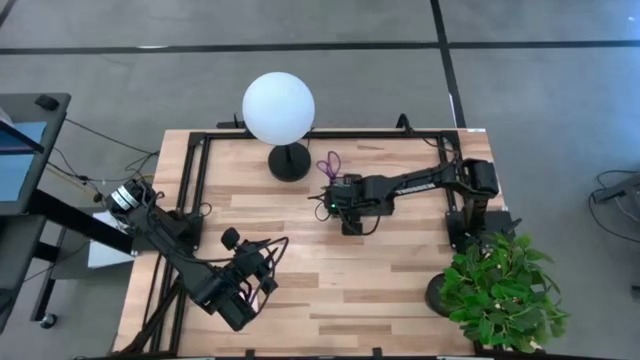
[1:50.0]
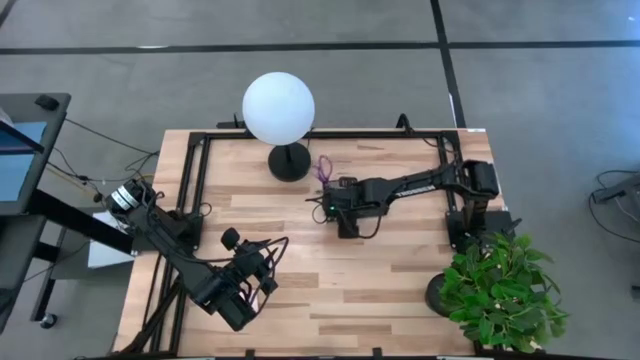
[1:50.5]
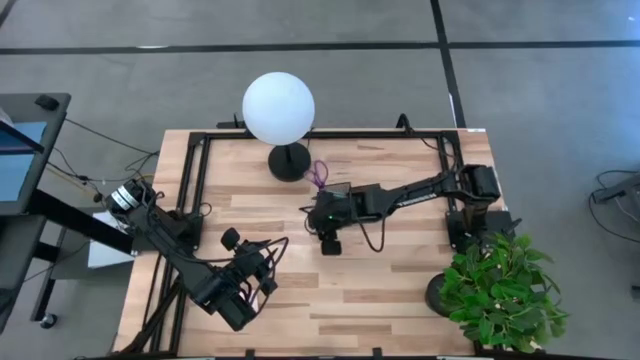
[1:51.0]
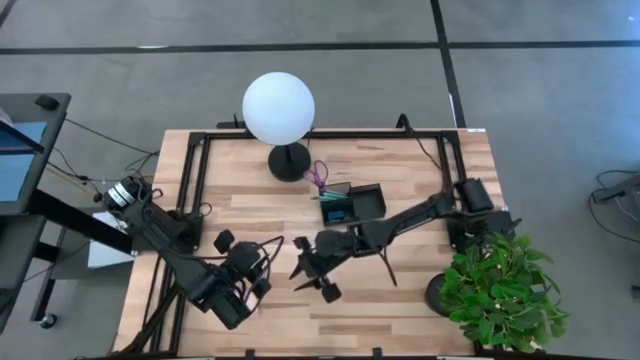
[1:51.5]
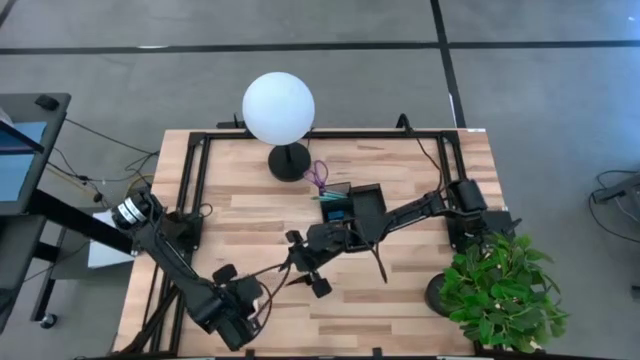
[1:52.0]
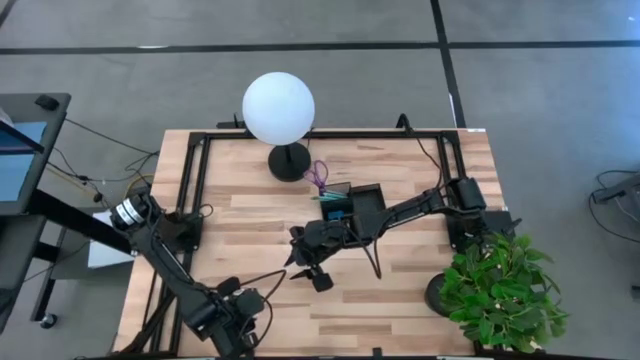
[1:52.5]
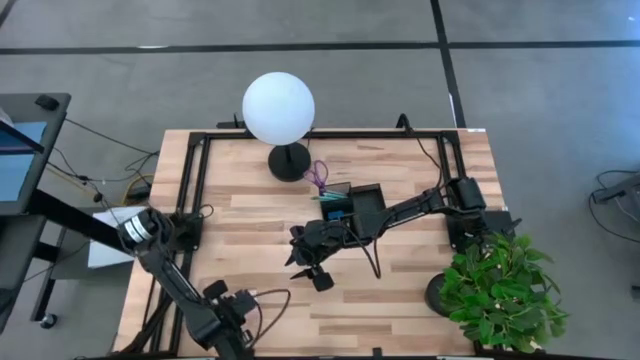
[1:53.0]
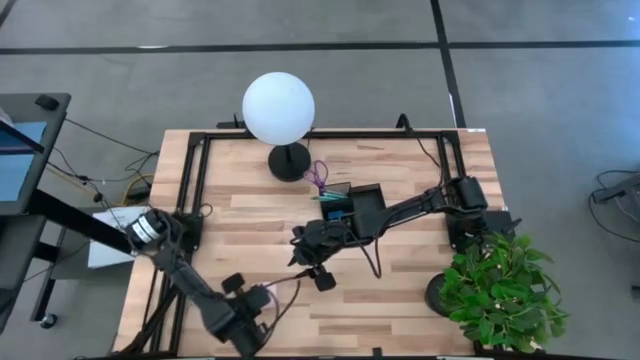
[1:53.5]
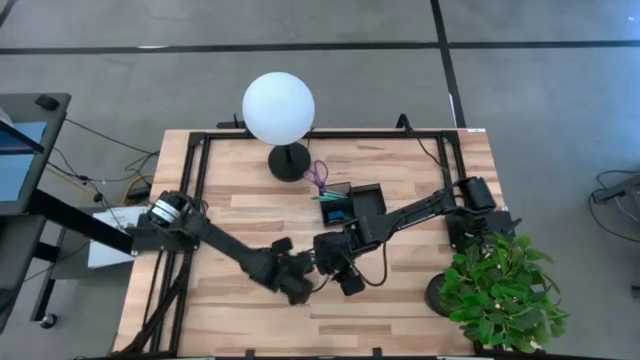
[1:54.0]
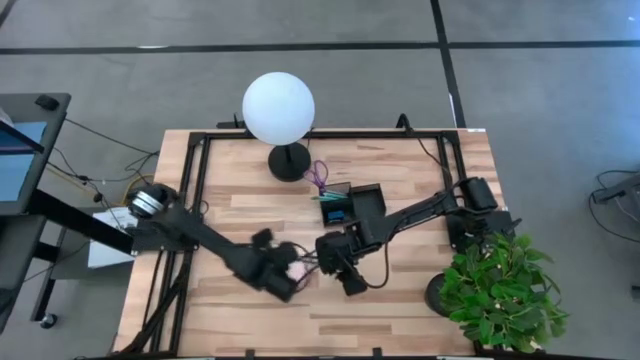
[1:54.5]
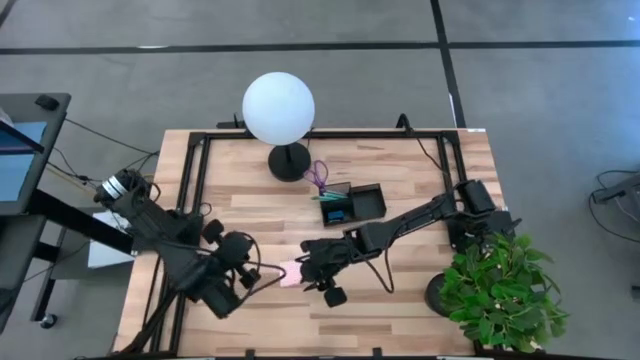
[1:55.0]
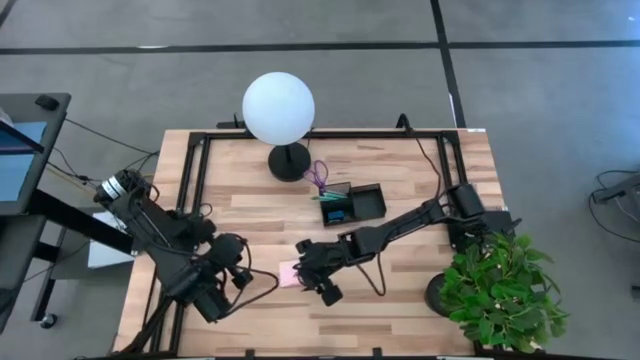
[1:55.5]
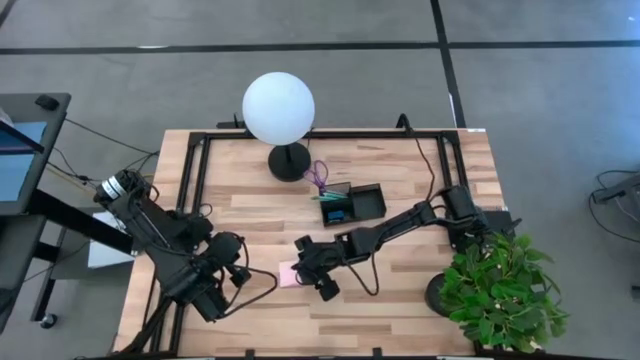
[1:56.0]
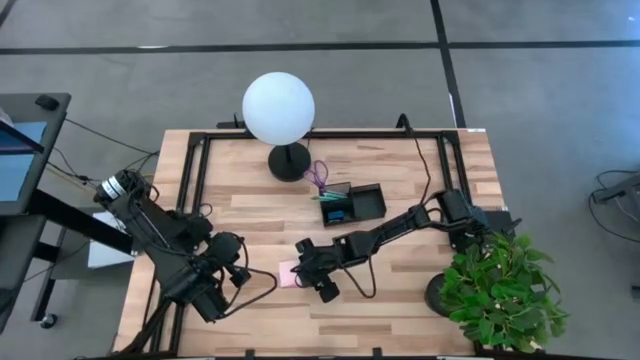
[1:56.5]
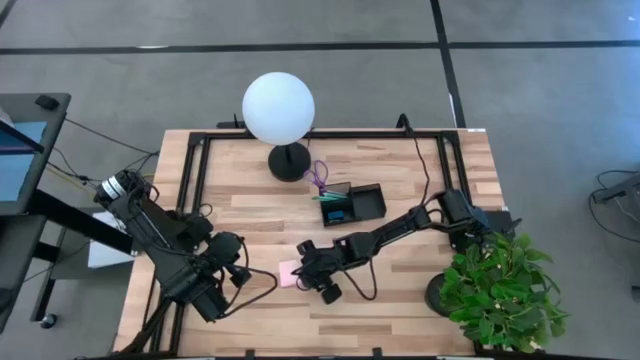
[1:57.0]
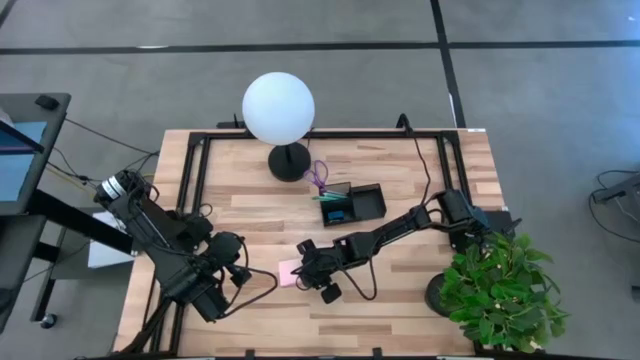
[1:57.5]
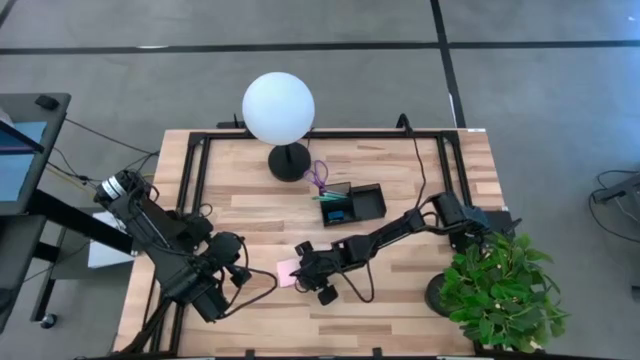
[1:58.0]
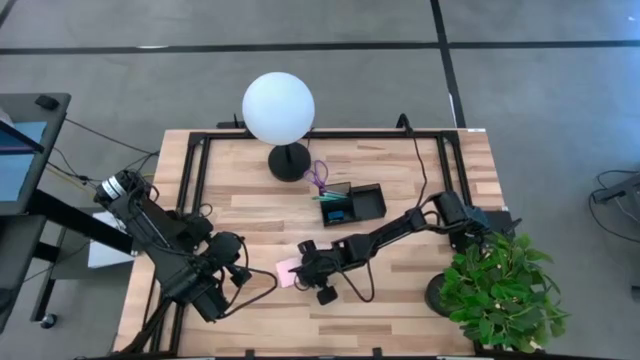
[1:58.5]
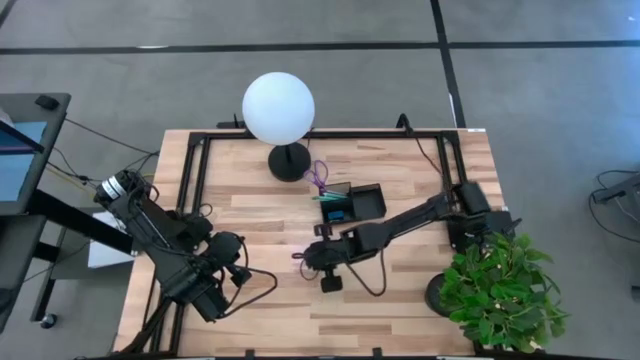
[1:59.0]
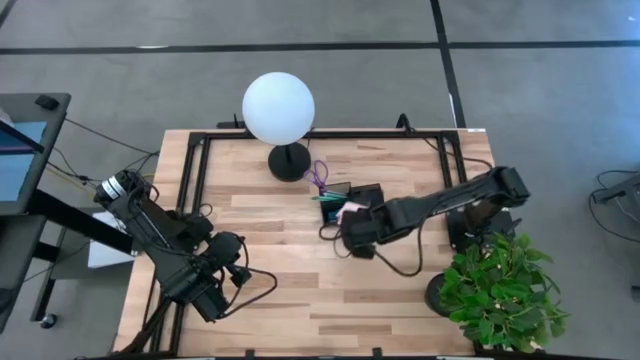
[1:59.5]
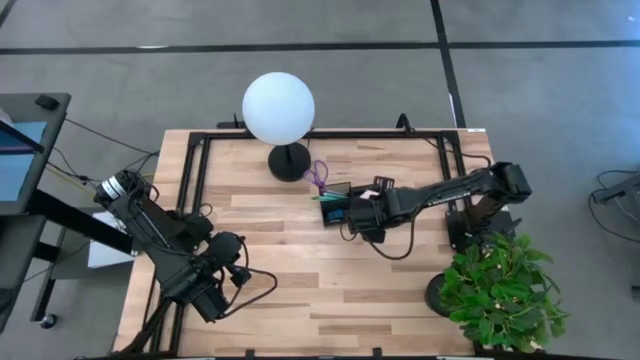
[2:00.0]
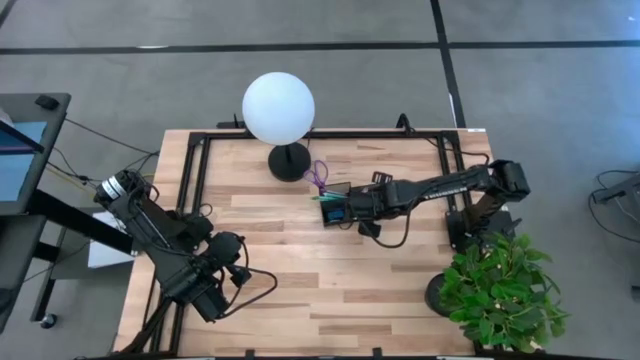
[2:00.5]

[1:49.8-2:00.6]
Task: Pick and place office supplies into organizer
Put the pink sticky notes into the black desk organizer

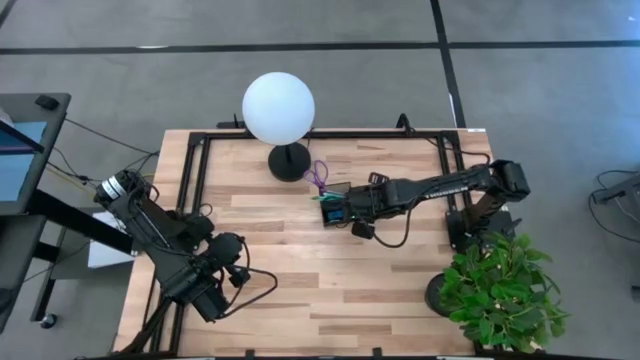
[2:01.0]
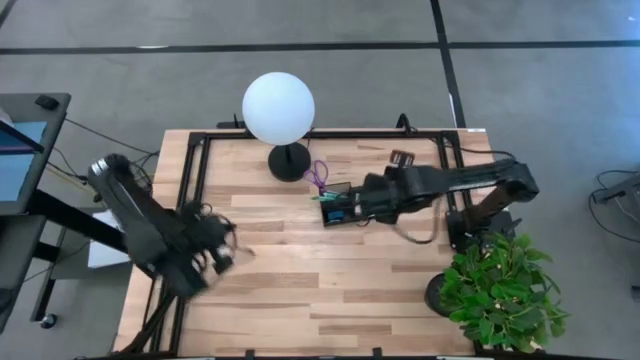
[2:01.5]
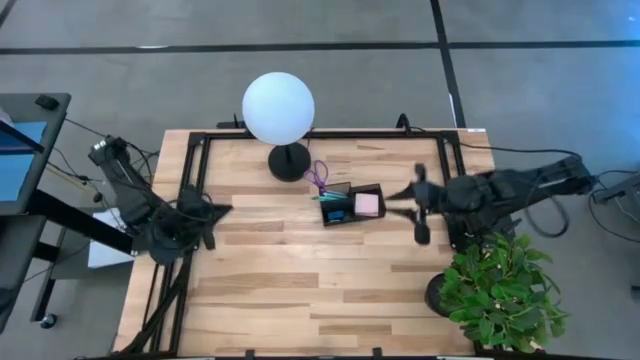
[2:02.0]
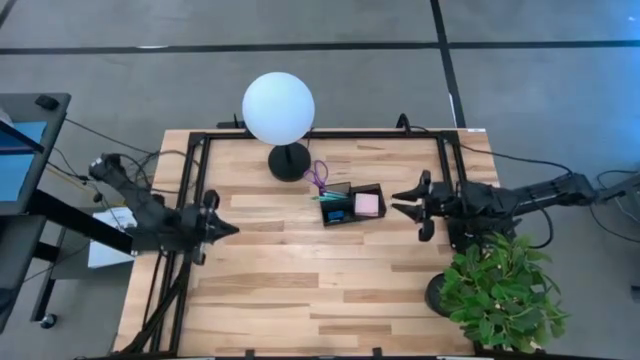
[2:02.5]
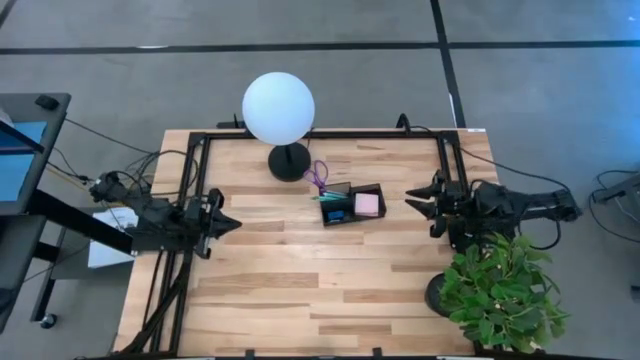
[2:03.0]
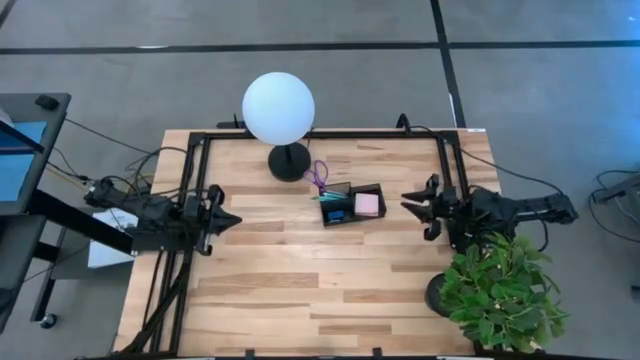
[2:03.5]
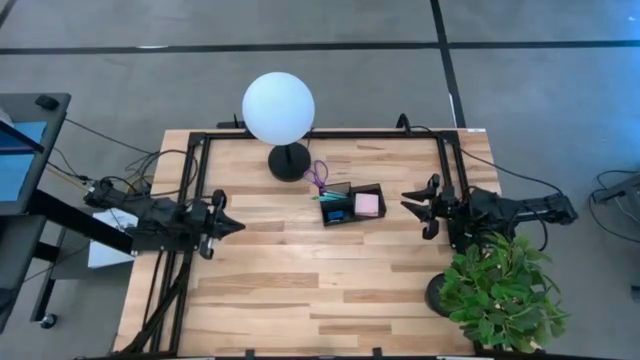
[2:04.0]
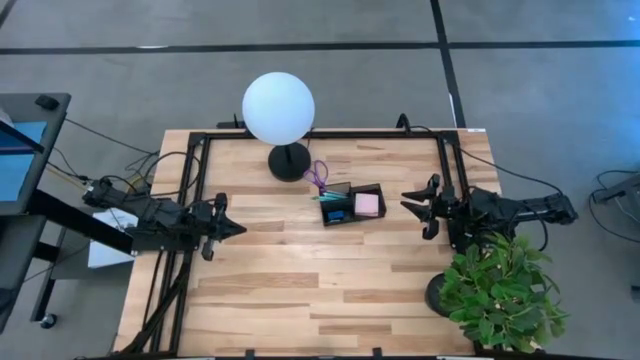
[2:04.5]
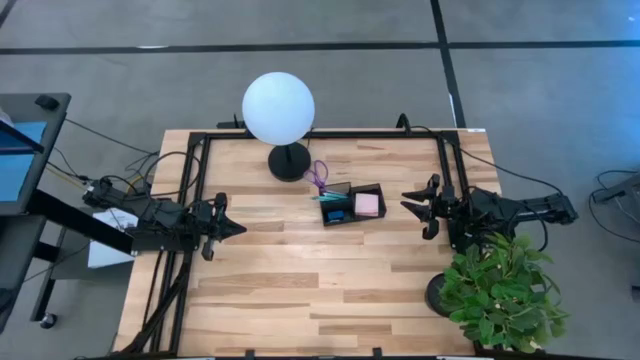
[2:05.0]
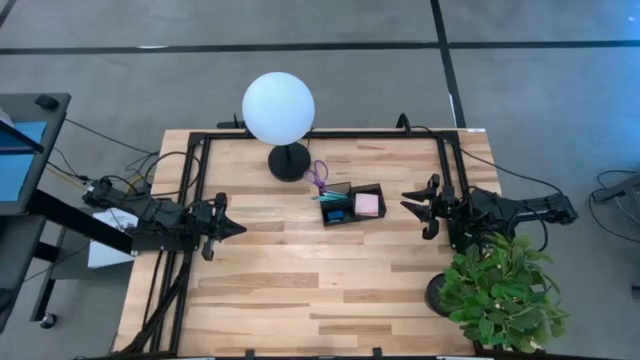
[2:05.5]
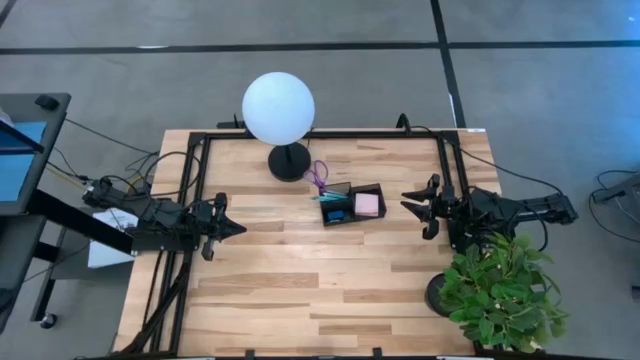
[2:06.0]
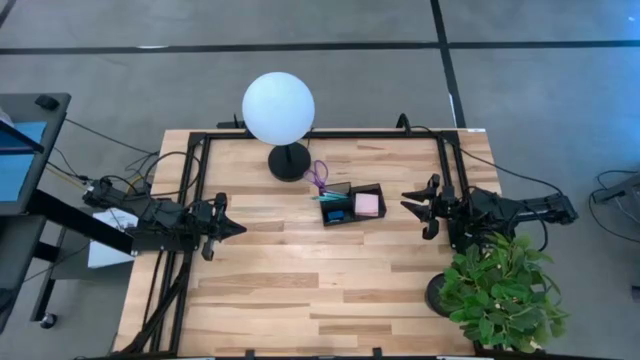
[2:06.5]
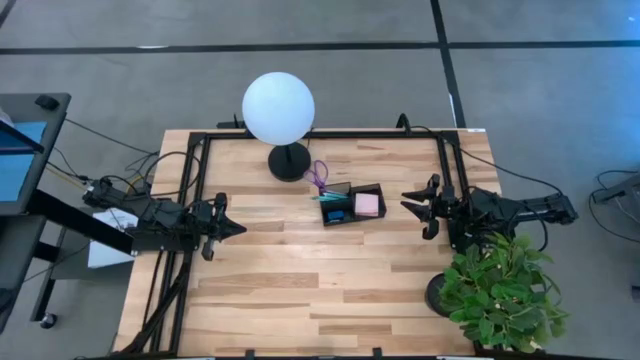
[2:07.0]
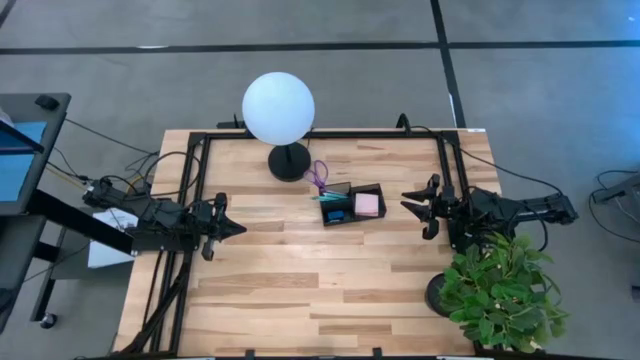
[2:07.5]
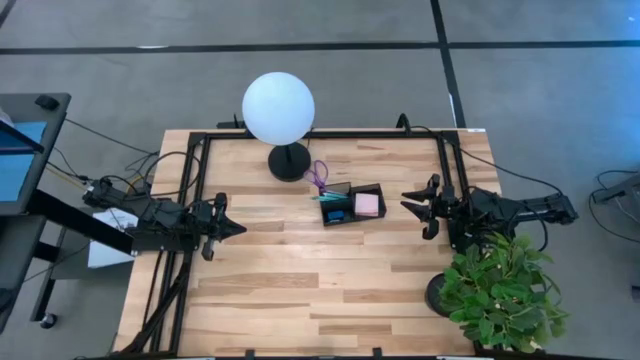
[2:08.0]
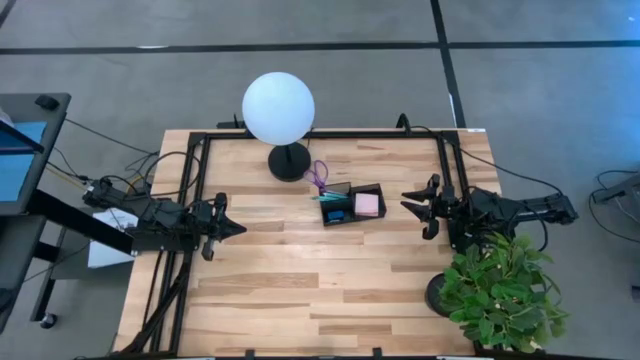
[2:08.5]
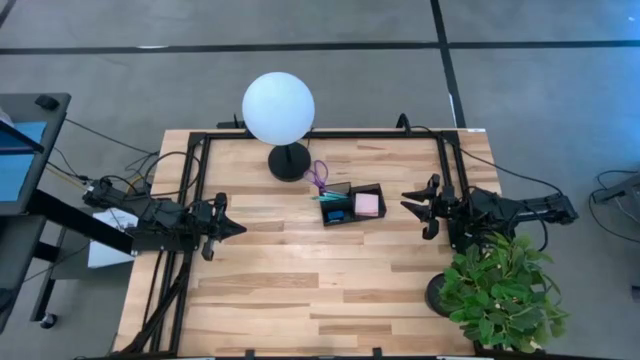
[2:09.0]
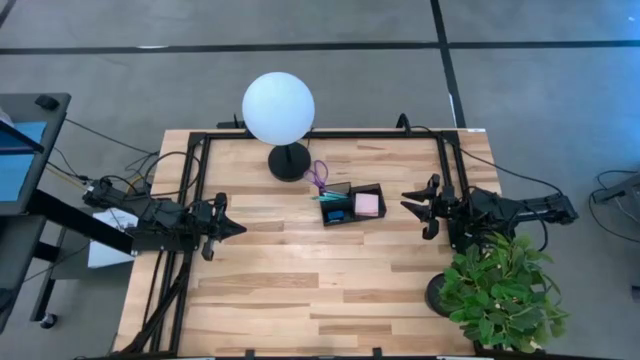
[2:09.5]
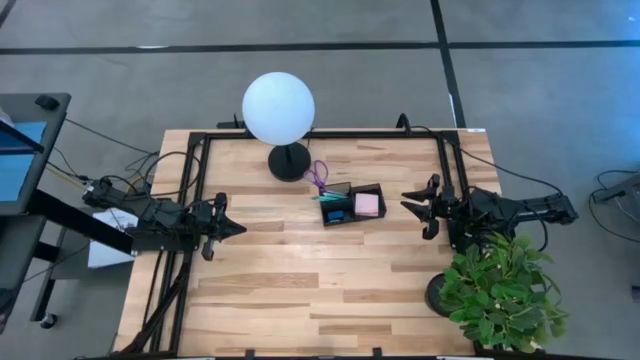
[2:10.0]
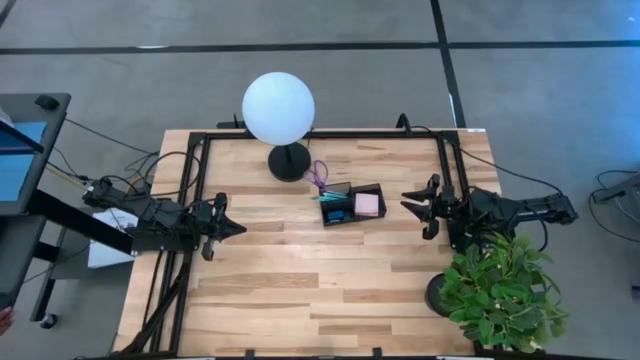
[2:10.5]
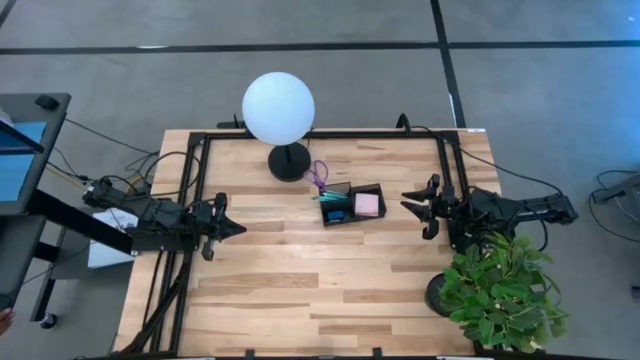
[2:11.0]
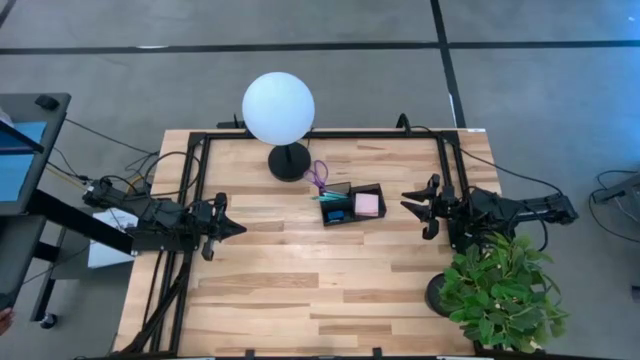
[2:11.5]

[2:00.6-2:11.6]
Return to Home Position
